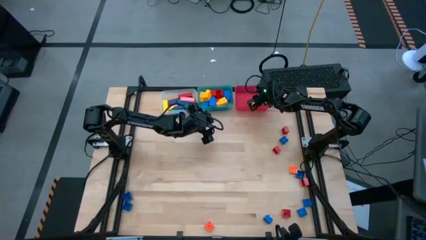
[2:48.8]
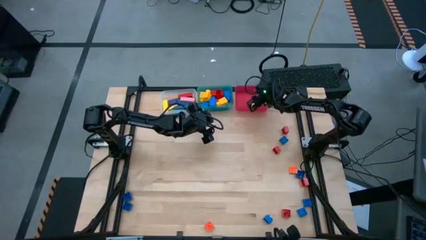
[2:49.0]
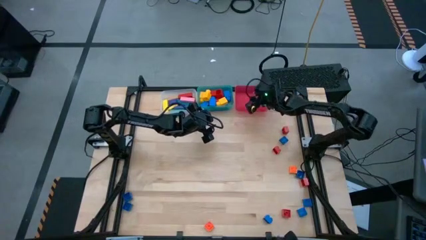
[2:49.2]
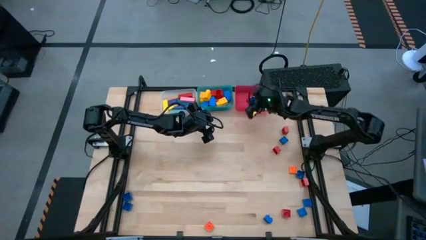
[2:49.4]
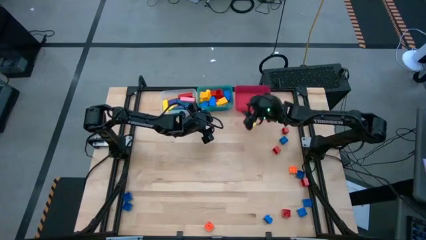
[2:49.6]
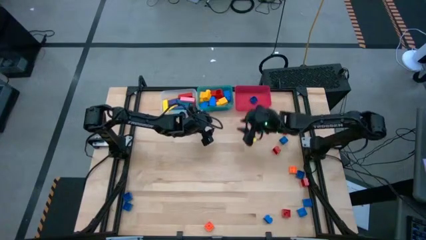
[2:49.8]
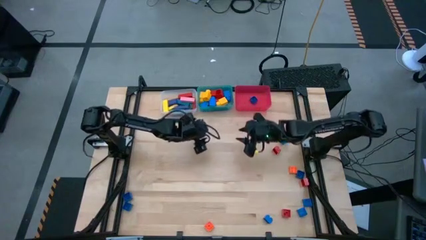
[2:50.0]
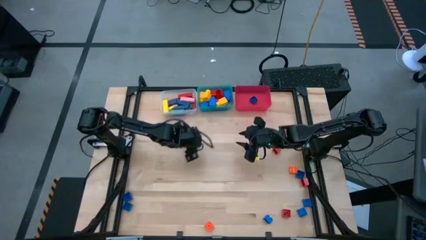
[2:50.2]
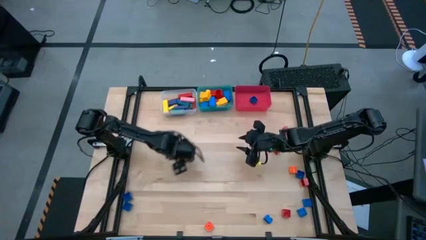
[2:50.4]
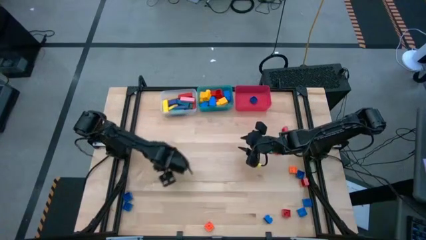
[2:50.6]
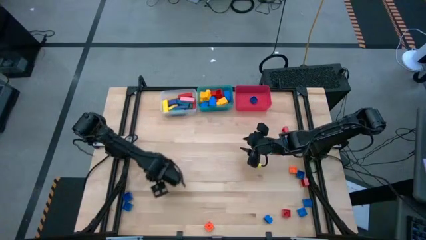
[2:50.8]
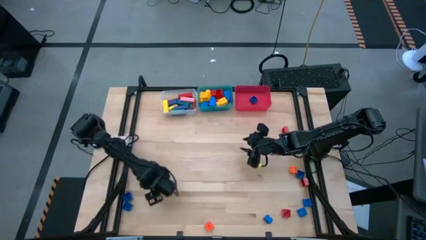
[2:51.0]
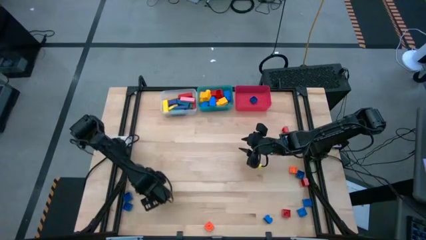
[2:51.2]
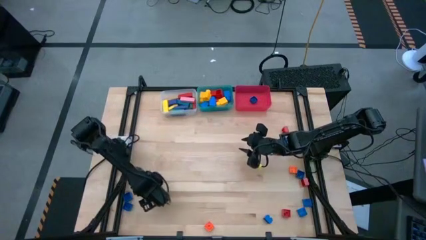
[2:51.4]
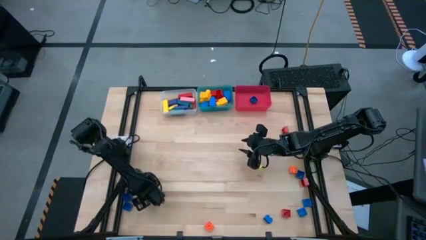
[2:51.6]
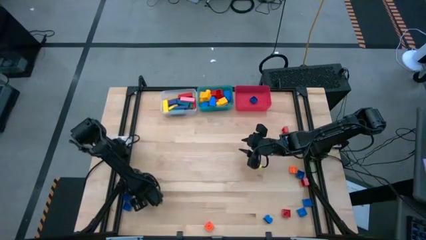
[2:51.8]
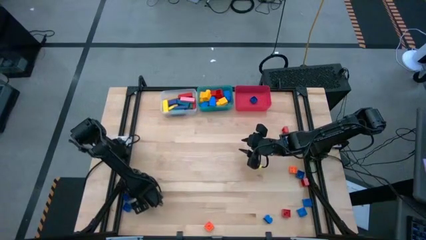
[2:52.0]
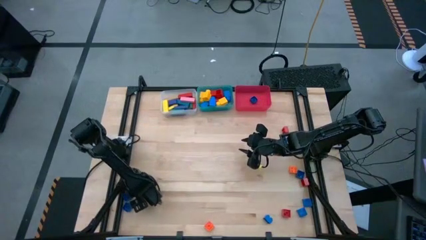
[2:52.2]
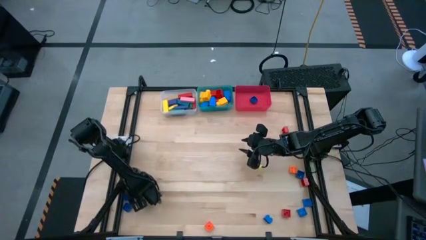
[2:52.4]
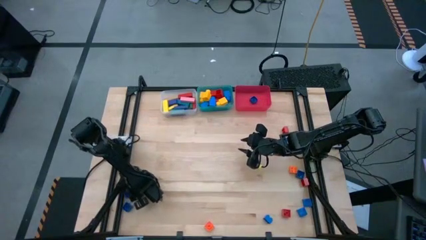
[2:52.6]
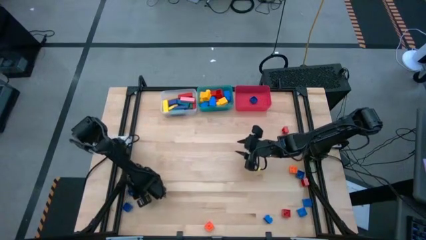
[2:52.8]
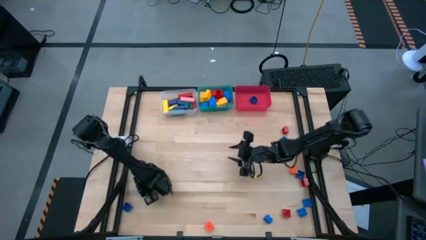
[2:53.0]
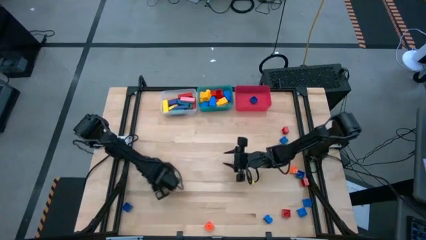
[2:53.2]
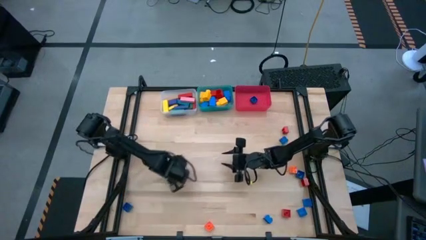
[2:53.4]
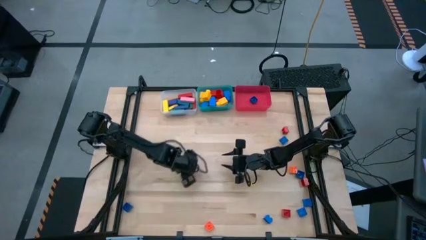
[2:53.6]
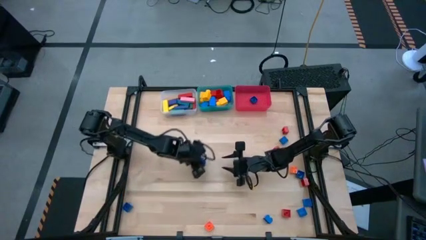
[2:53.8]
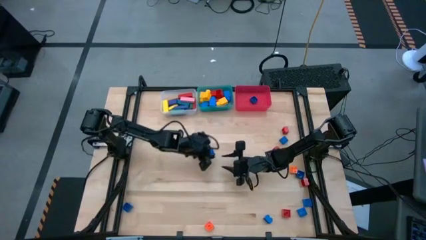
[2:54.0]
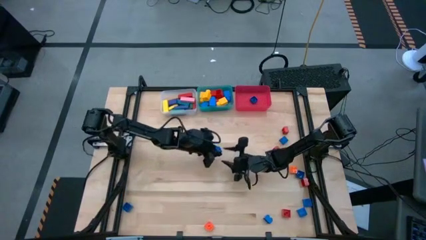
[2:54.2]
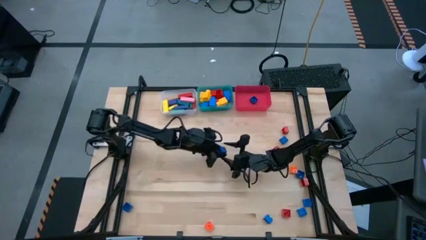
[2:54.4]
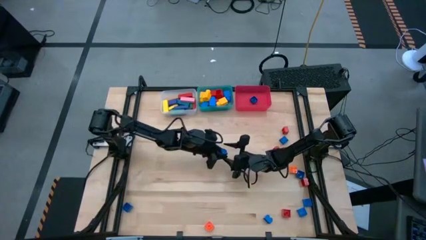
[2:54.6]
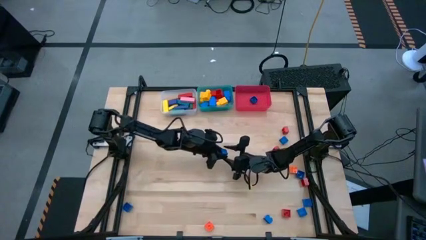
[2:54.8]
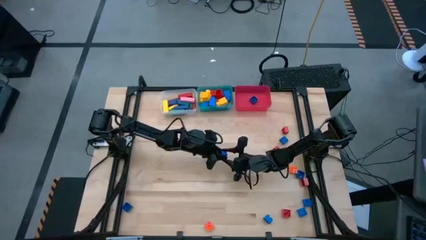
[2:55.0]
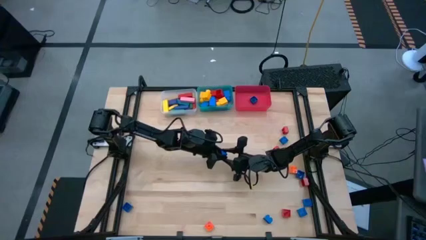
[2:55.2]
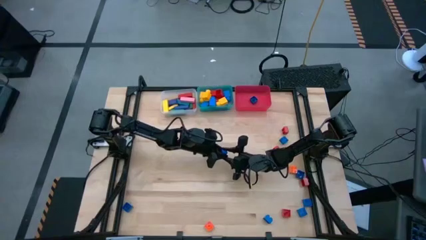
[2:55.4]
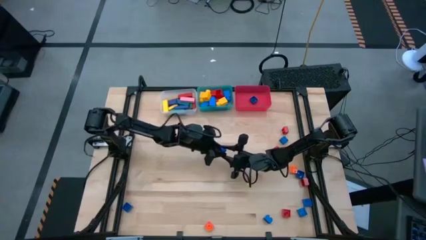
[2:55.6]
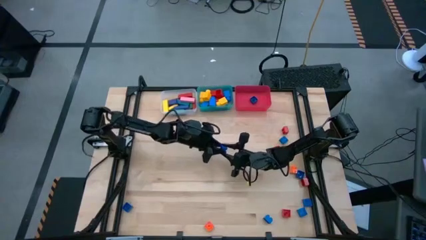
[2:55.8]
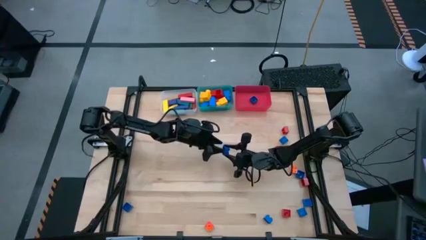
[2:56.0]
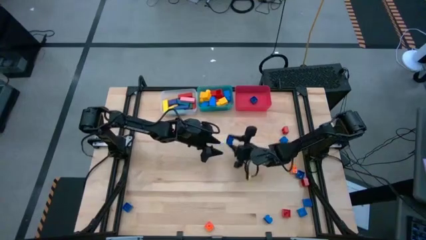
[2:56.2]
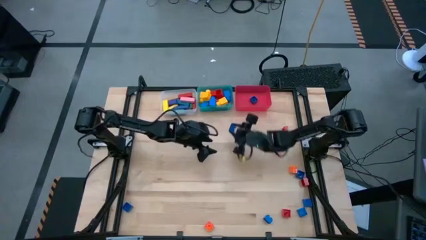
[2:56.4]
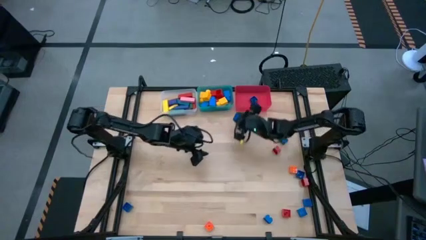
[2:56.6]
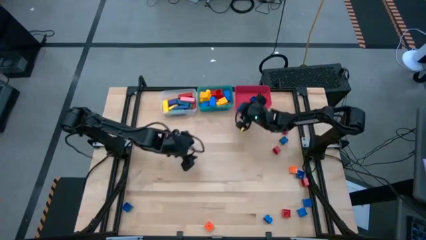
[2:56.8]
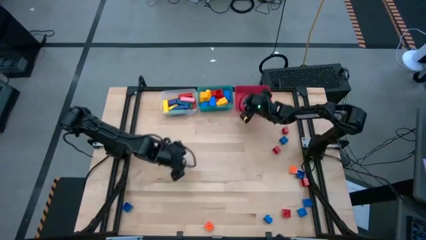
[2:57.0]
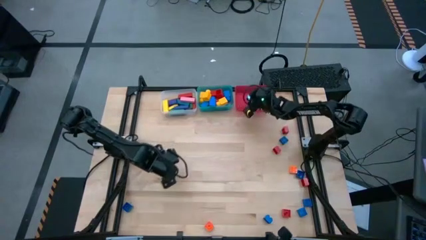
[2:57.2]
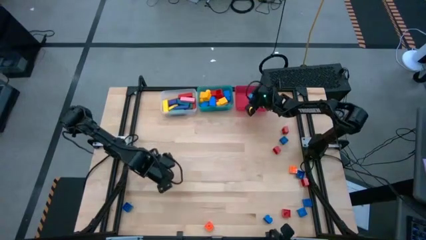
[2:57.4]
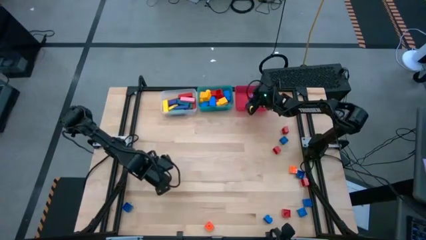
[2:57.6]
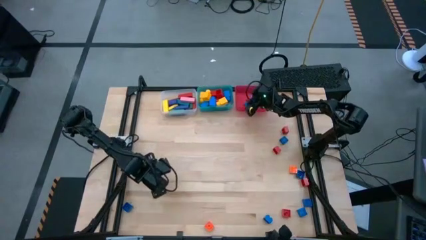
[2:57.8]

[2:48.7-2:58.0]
Task: Sort blocks by size
Put the blue 4 stud game piece into the red bin

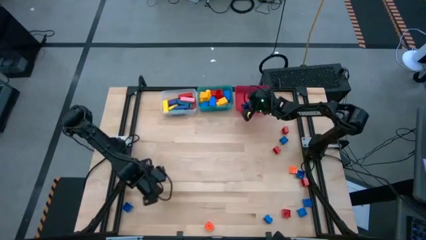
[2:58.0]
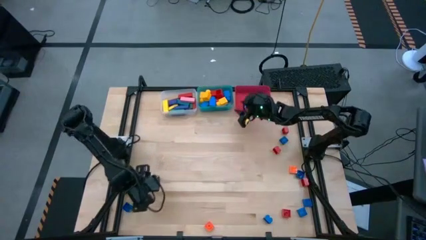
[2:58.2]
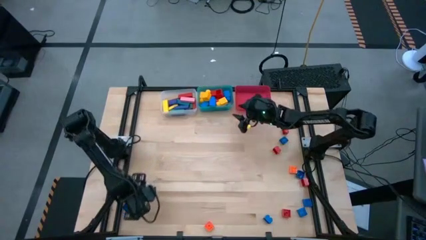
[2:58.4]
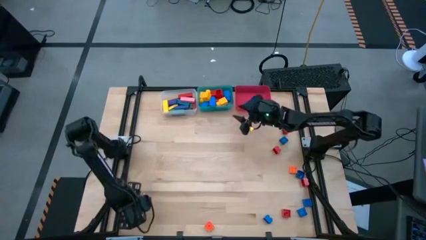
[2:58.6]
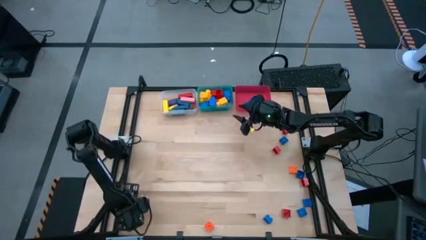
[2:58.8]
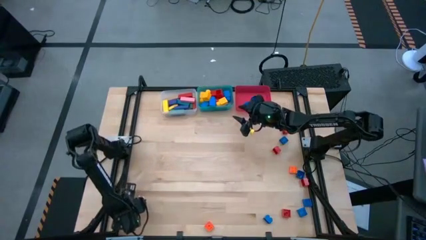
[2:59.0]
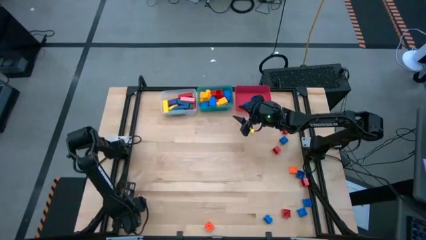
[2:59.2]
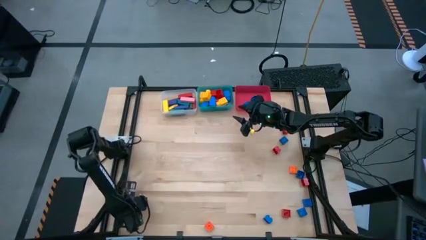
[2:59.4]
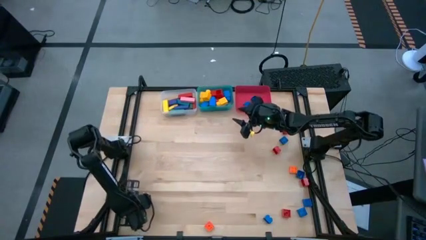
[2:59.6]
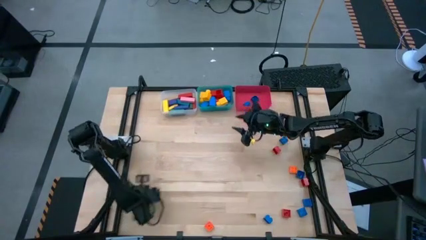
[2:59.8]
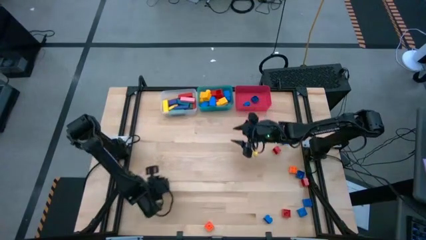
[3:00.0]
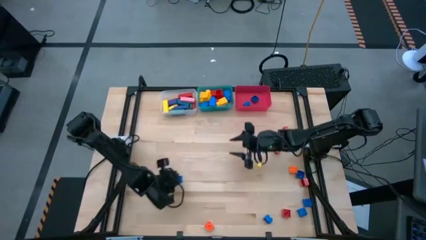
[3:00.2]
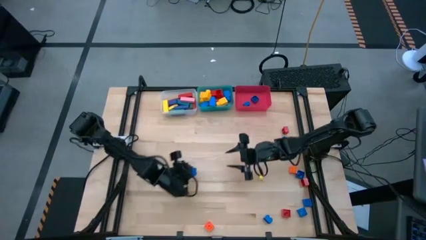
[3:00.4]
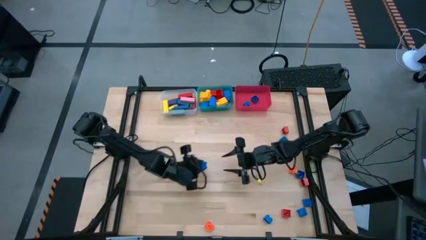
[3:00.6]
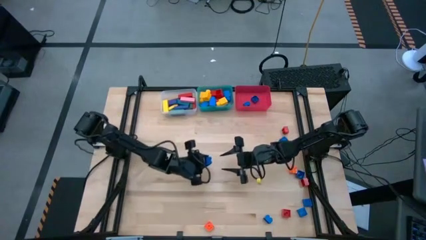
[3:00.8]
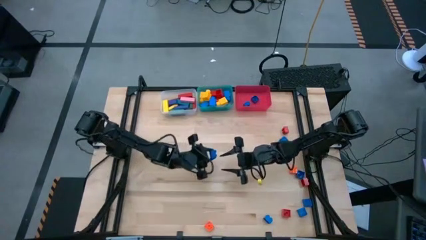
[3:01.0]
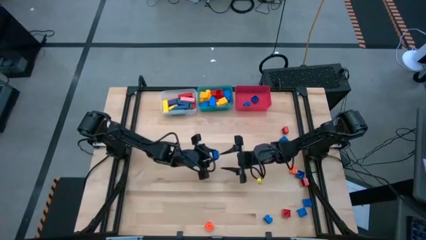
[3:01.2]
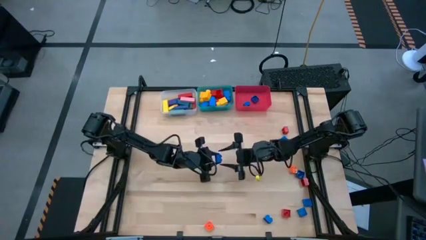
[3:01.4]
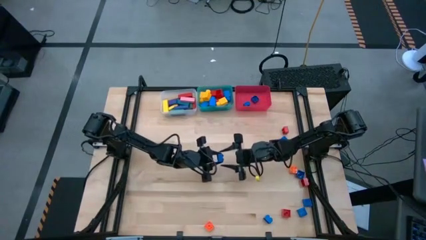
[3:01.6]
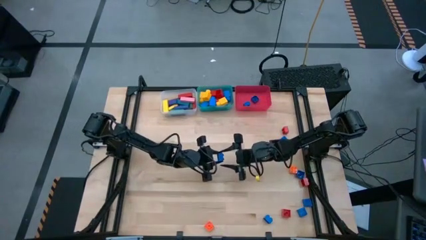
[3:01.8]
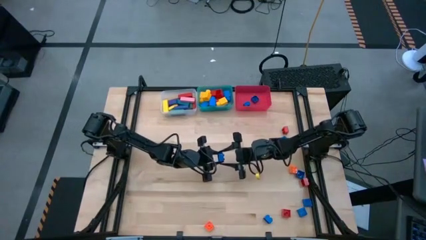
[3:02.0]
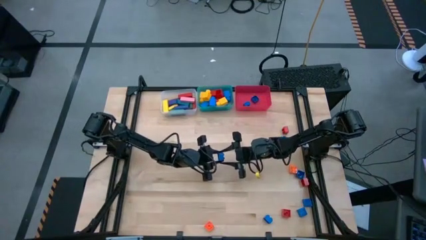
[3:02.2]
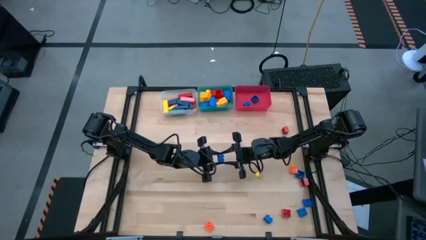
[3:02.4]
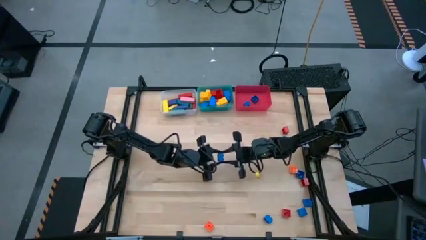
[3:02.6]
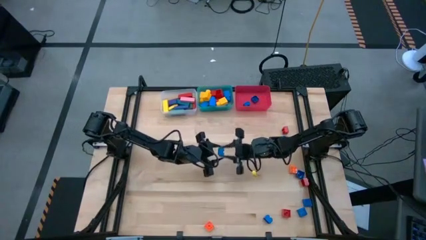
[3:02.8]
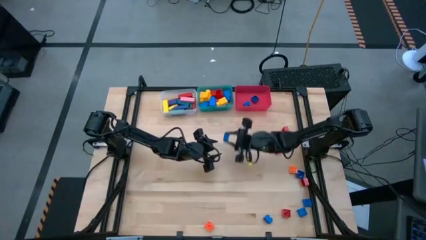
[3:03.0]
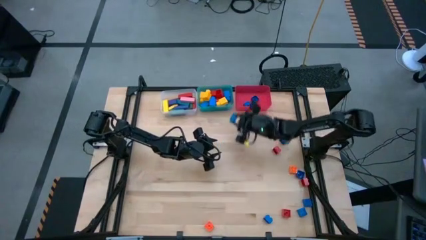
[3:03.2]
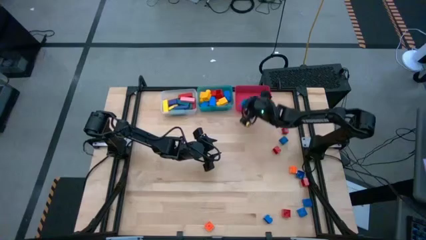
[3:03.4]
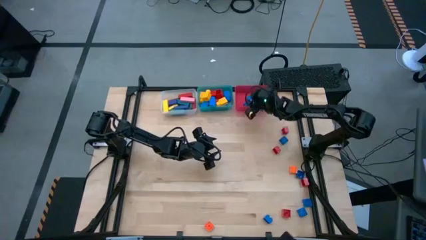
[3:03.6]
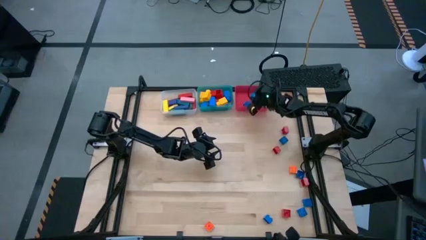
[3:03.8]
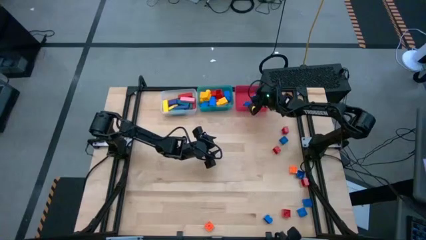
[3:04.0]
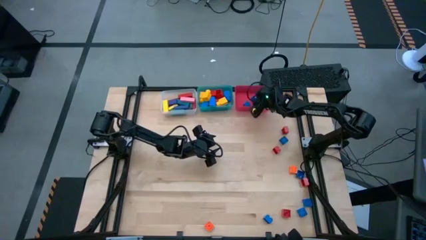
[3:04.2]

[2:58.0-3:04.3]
Put the blue 4 stud game piece into the red bin

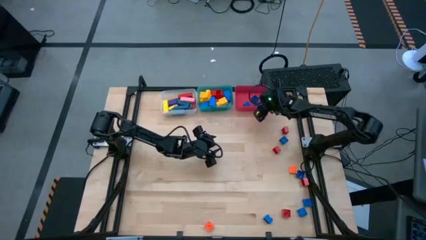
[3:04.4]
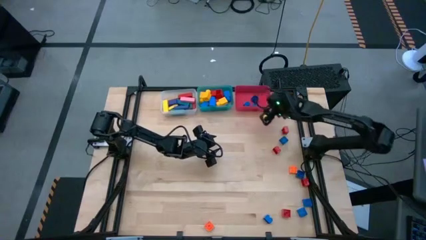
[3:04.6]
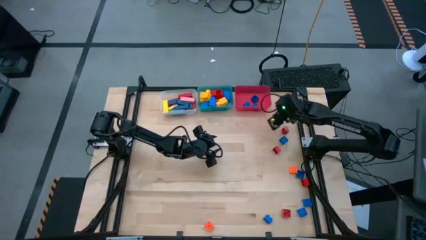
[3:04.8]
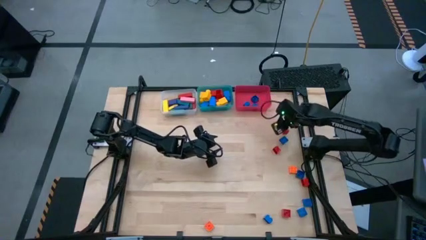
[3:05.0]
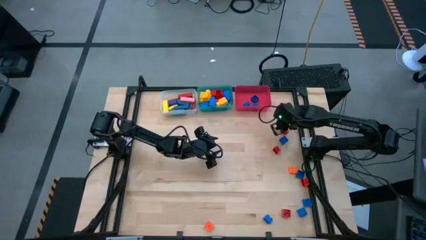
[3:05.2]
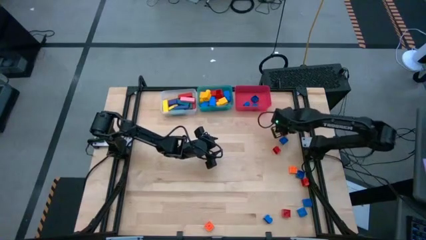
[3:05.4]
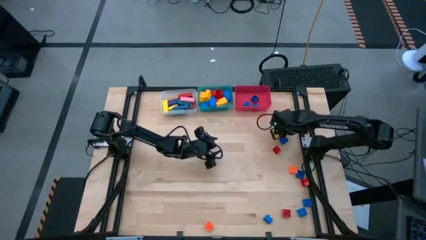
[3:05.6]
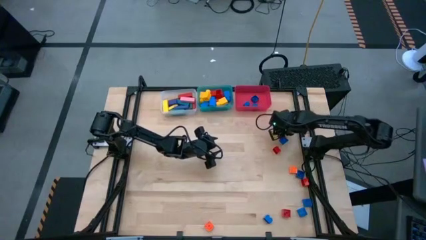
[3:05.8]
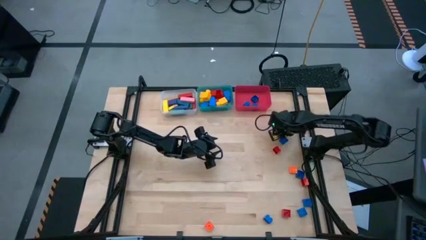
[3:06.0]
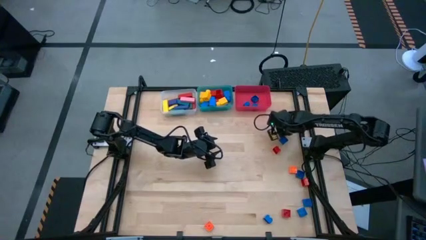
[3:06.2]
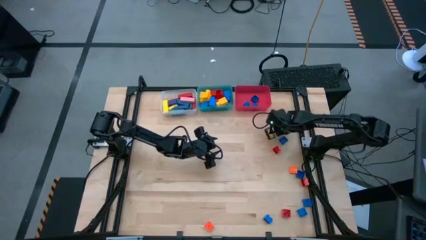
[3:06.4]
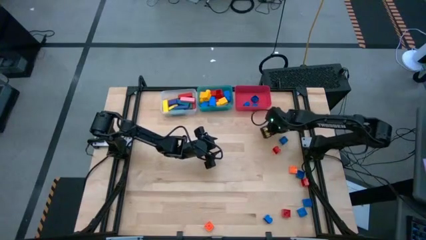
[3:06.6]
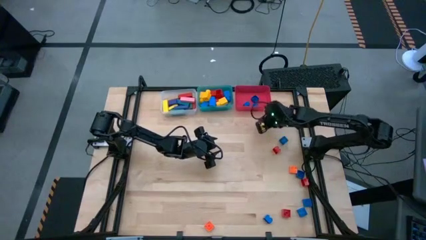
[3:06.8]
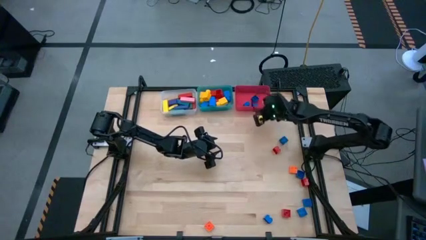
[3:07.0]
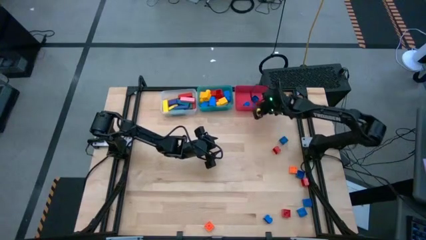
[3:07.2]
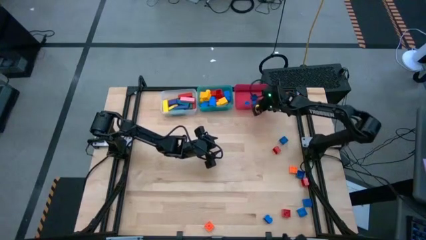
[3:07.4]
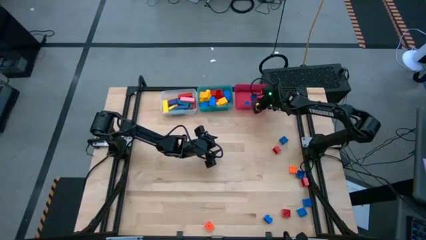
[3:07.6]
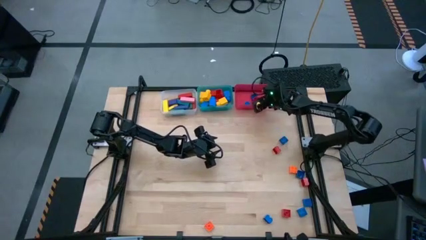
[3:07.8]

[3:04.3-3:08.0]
Put the red 4 stud game piece into the red bin
